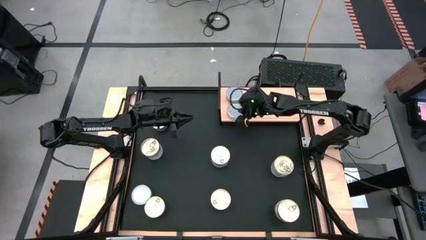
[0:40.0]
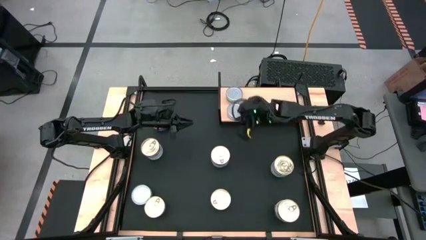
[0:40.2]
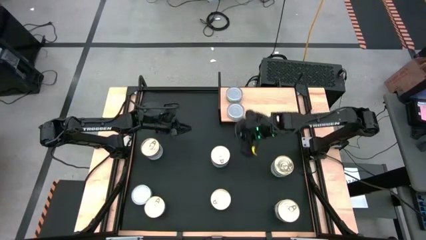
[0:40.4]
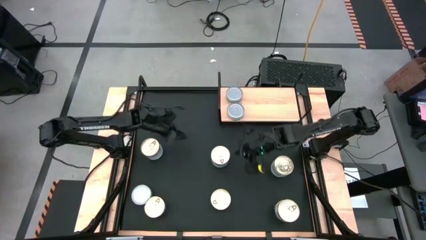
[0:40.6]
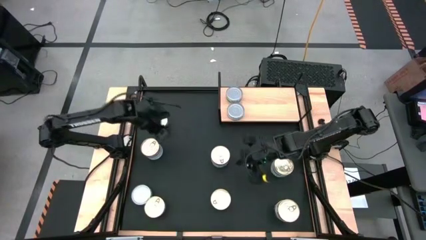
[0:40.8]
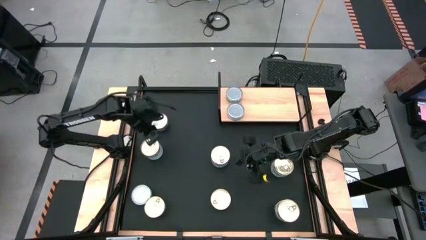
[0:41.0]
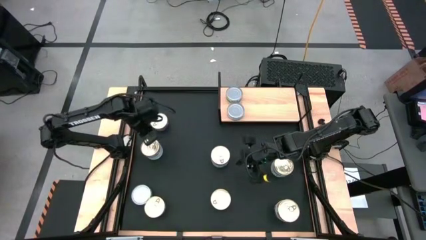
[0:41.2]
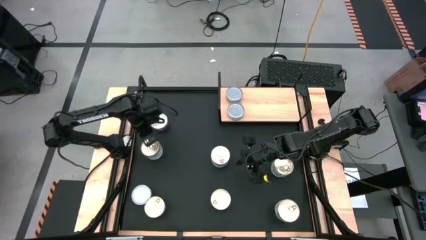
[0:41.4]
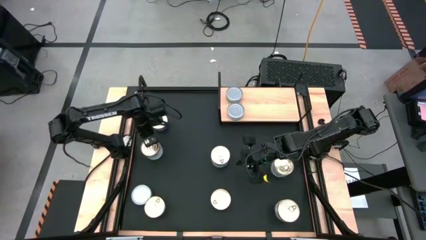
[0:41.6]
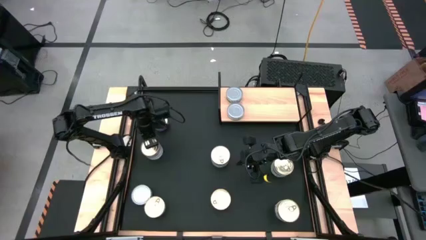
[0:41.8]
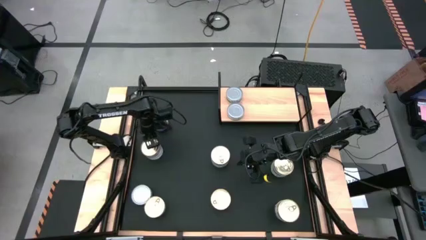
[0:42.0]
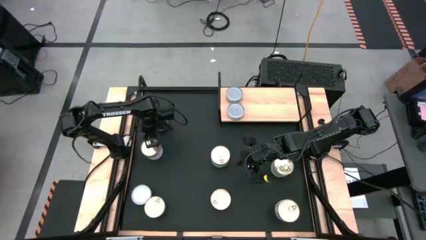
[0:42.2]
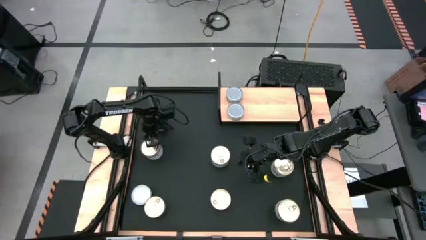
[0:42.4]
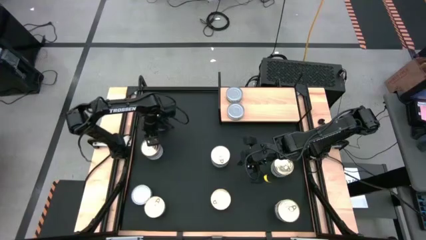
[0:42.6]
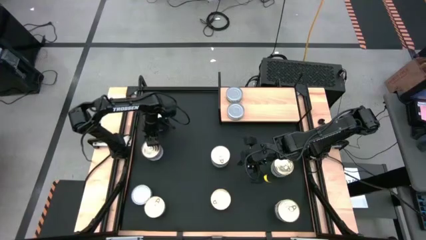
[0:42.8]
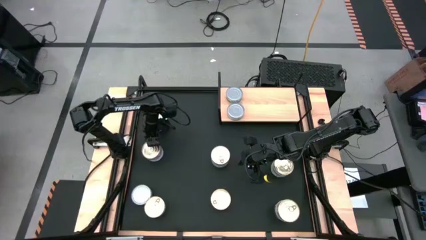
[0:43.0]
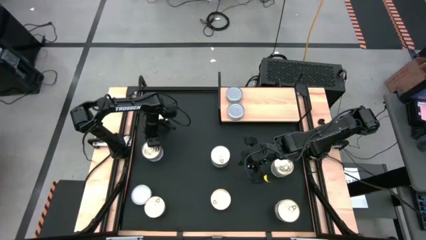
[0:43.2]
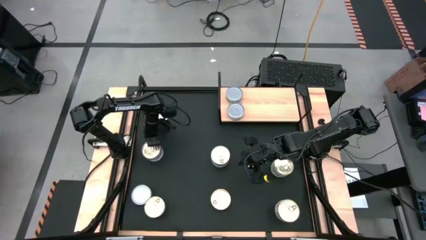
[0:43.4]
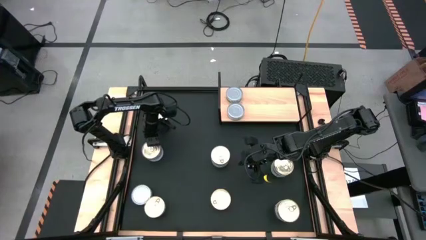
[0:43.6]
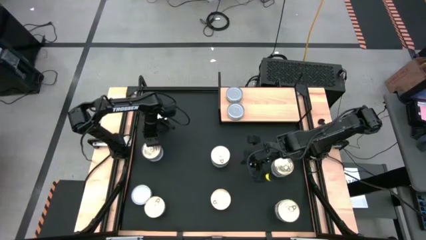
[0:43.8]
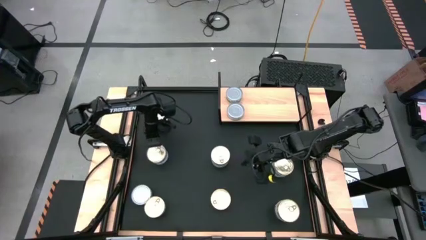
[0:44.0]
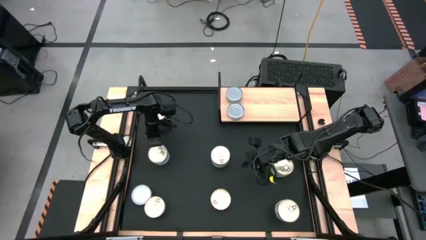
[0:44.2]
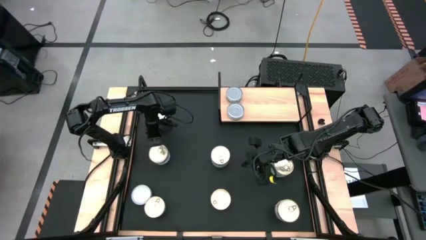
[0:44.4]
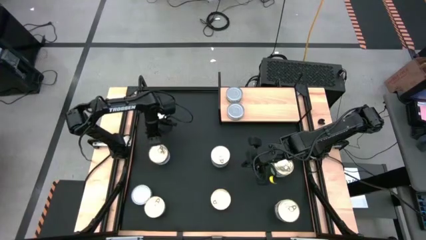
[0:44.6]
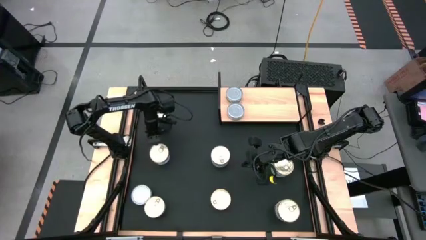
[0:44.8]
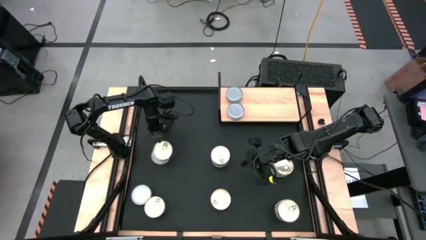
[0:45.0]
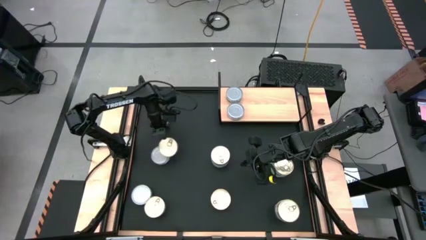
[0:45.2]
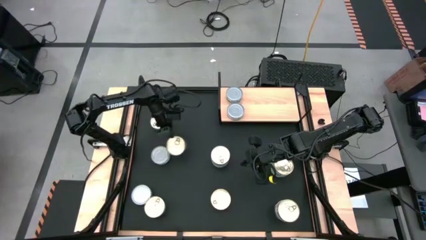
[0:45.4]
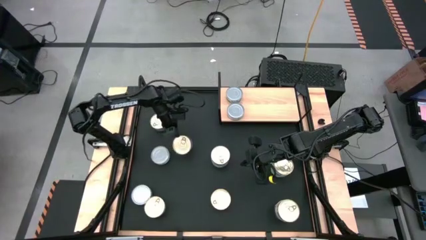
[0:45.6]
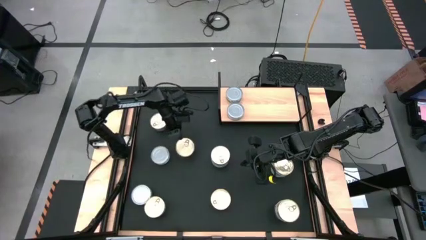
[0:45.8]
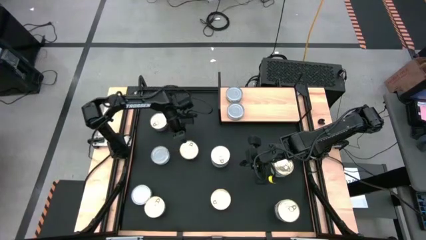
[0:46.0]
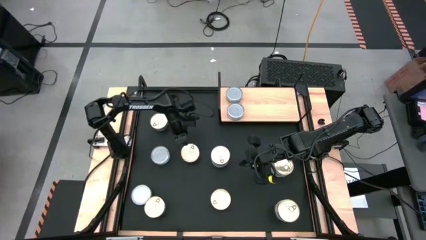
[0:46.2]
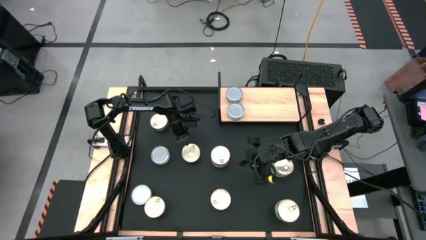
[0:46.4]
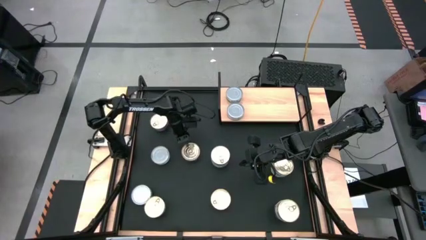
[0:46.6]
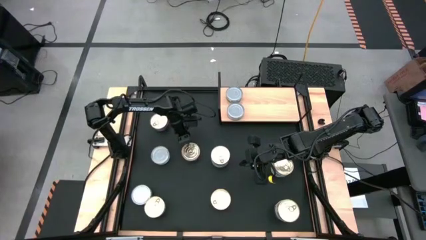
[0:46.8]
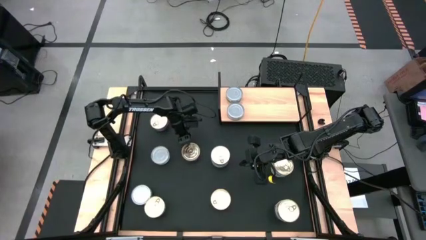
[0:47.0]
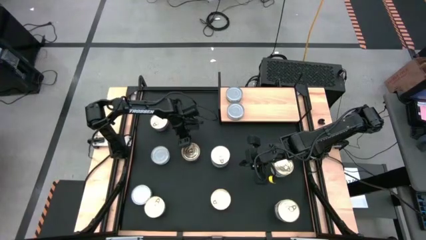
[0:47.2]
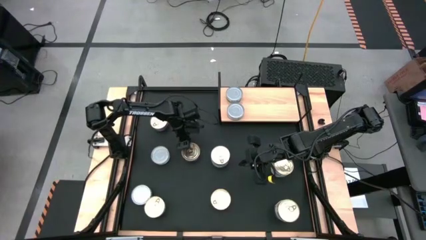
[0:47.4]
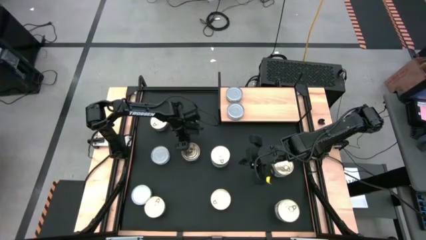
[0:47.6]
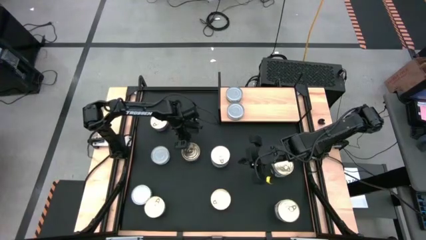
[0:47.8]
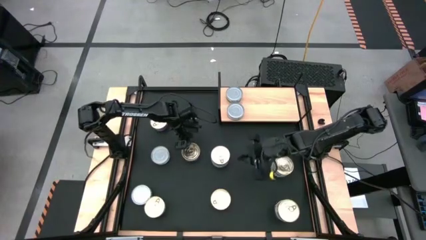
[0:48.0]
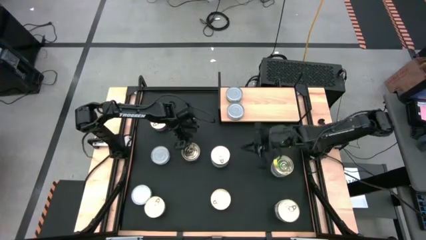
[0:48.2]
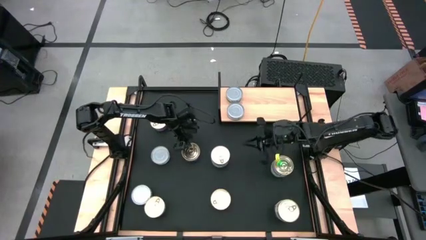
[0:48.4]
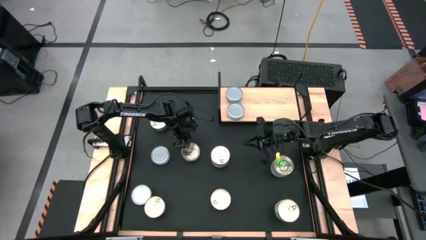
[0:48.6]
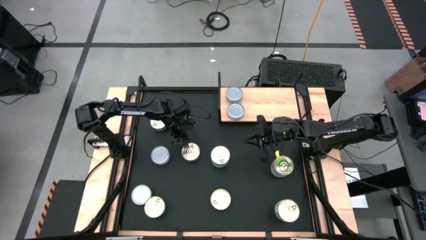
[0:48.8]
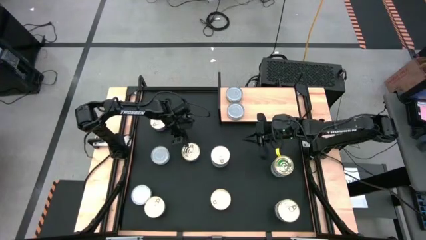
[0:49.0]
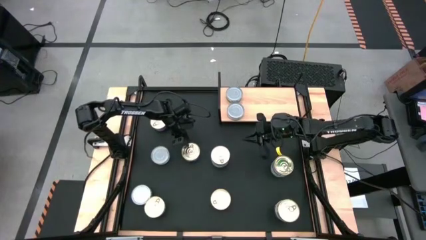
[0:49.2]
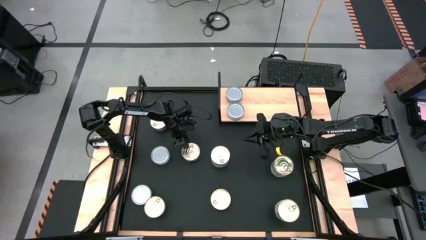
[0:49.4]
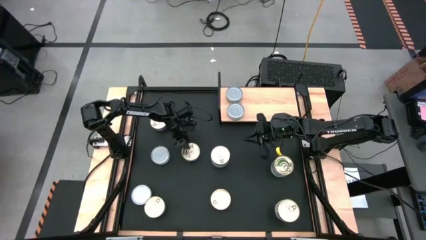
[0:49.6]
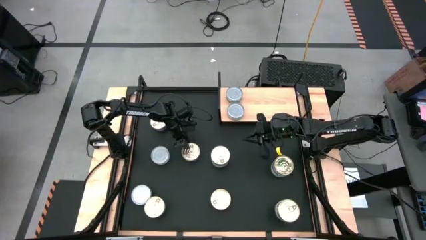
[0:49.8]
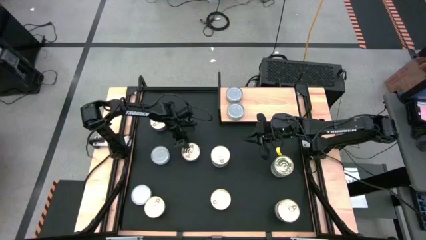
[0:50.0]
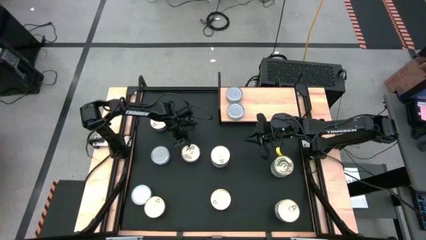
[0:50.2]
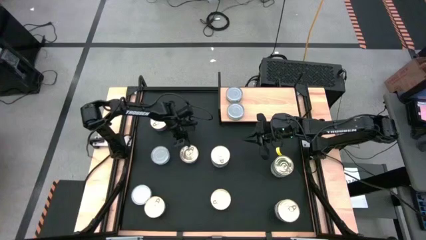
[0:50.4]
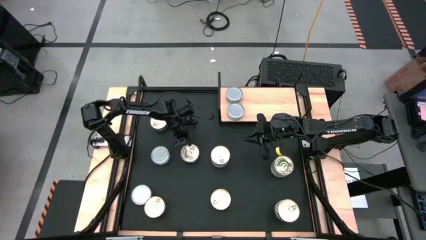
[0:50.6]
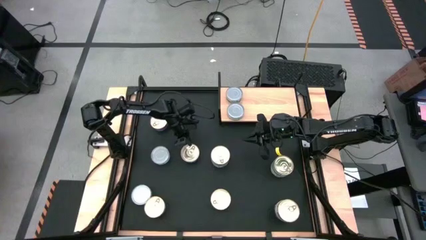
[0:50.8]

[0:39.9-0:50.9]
Task: Stack canned seafood by type on shelf
Put the blue pink tuna can on the shelf

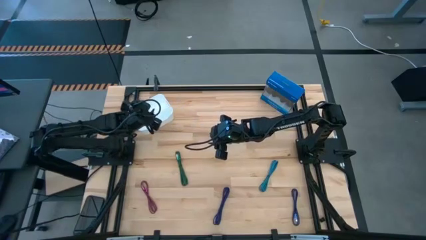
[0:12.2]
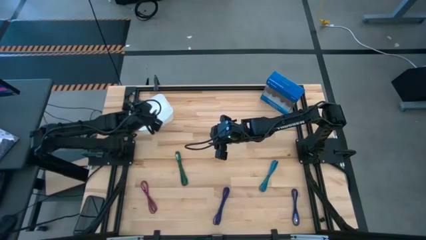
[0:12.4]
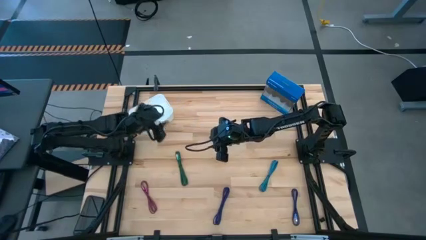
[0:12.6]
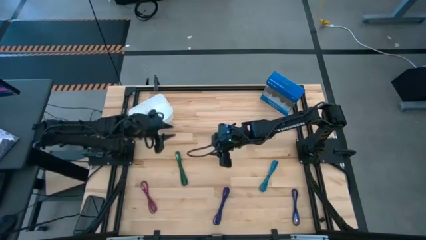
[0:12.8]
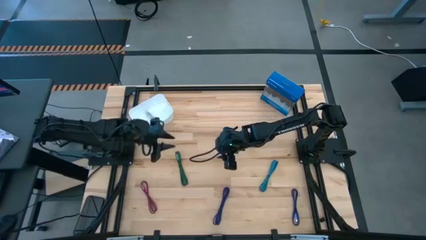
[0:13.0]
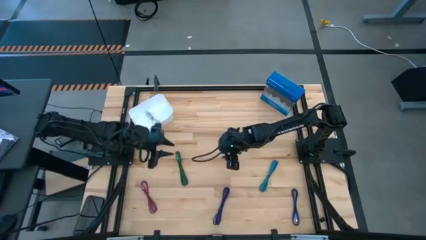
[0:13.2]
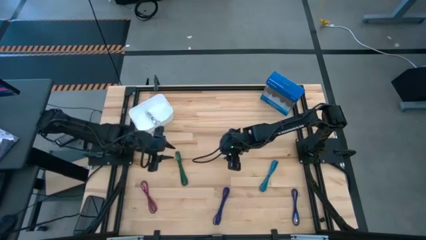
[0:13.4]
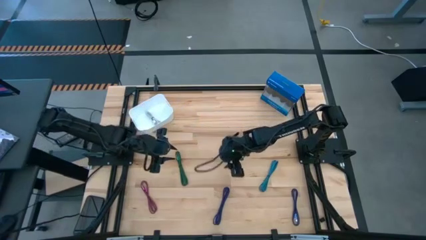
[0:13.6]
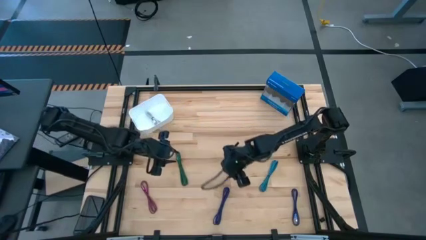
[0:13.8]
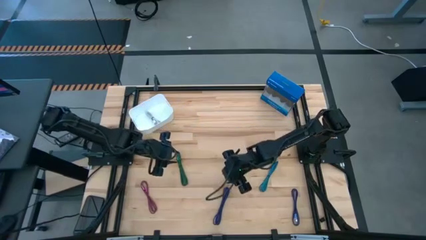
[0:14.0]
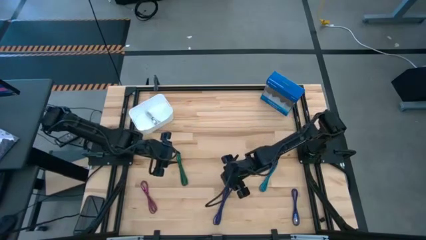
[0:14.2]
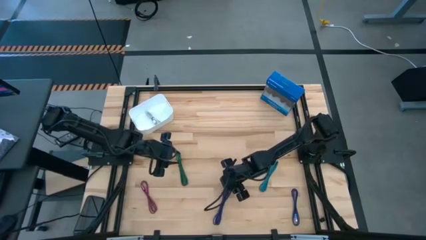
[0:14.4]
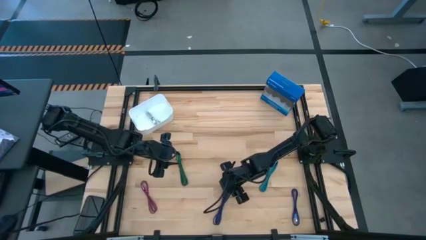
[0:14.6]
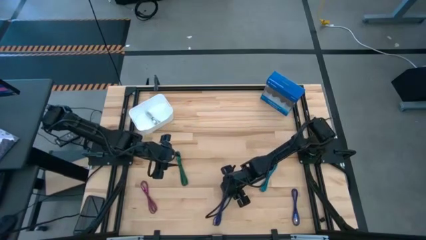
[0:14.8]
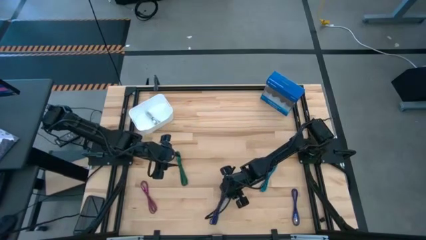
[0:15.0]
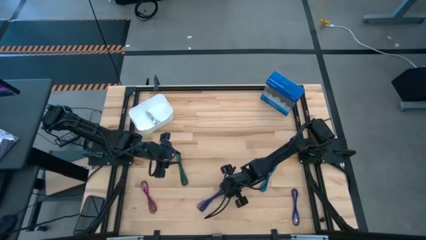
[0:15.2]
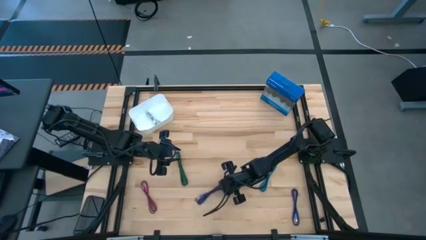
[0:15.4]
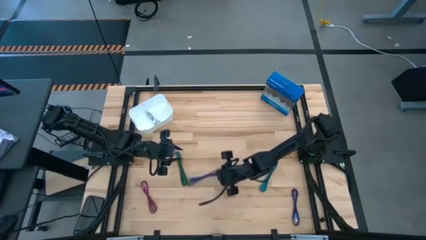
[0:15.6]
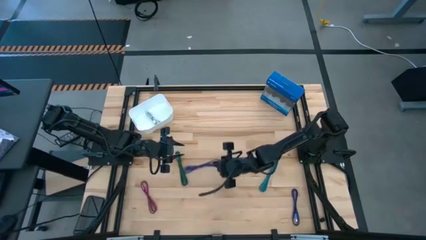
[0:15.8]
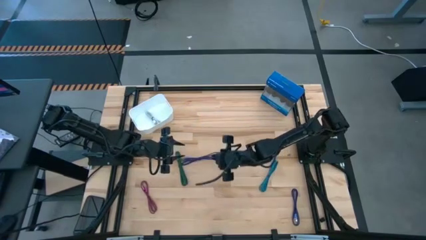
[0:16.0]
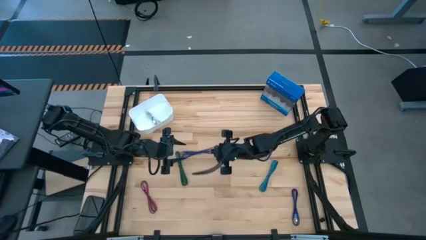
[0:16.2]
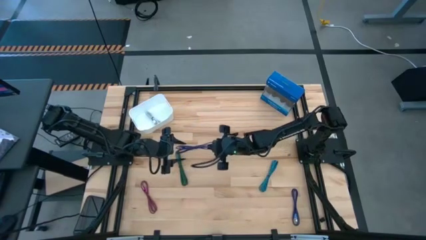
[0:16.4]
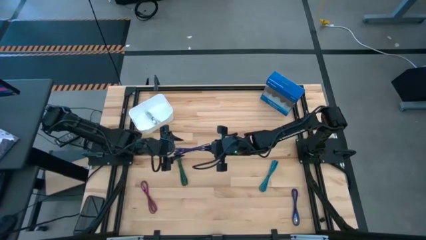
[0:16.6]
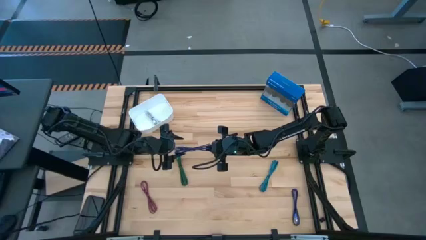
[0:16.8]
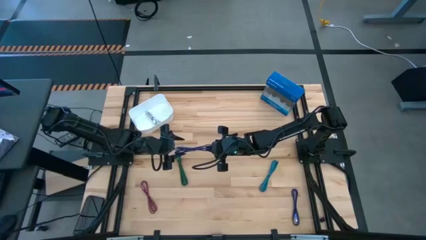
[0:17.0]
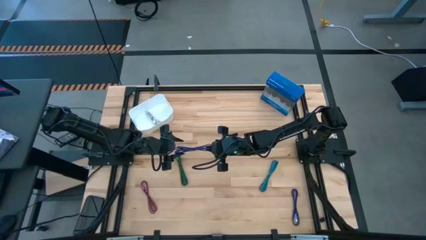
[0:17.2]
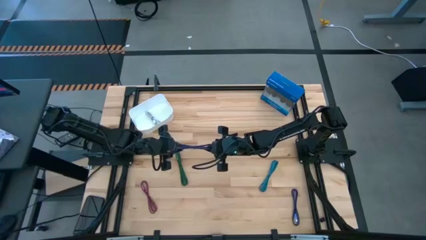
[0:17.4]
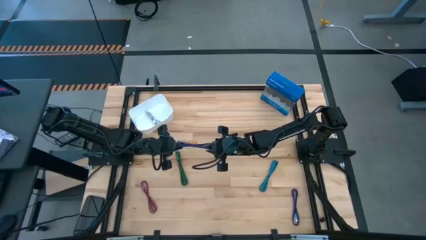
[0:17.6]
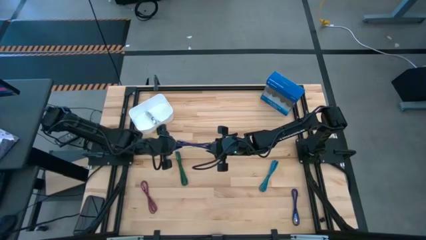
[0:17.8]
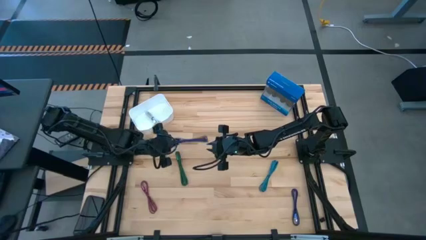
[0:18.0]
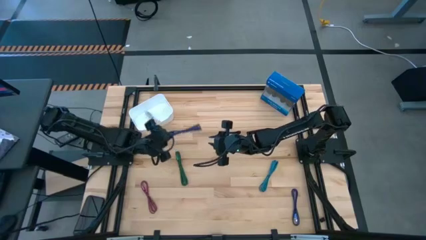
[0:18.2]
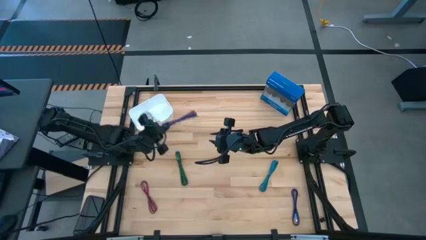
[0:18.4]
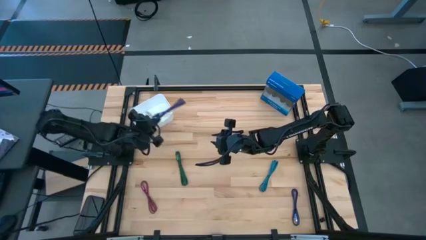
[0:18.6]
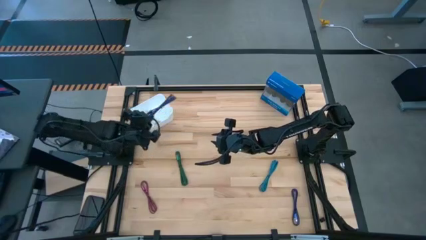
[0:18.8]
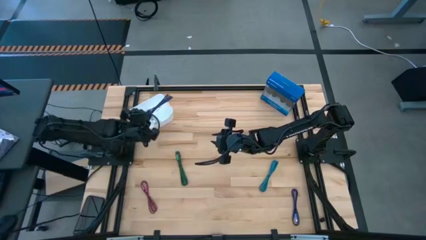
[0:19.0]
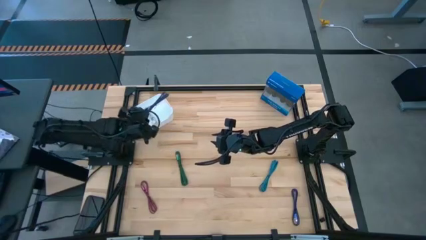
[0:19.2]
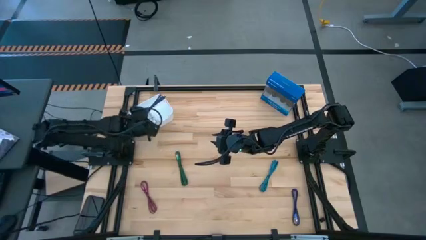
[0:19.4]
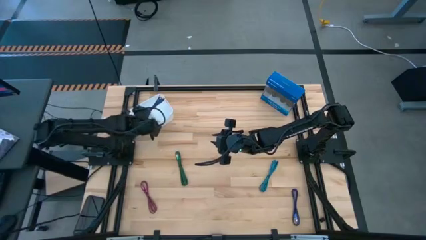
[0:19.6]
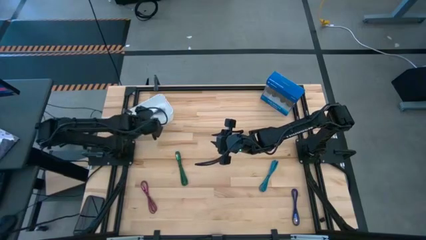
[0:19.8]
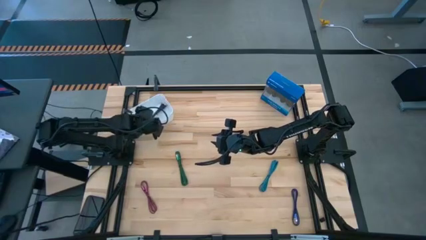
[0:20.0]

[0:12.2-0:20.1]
Task: Pick and place USB-C Cables
Put the left purple charger cable into the white bin
